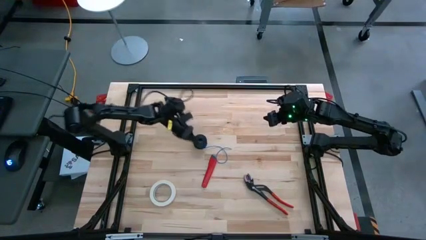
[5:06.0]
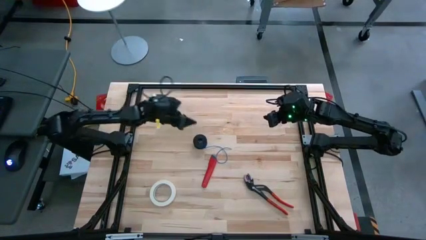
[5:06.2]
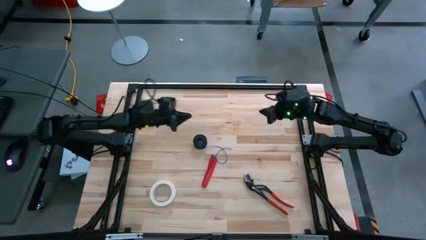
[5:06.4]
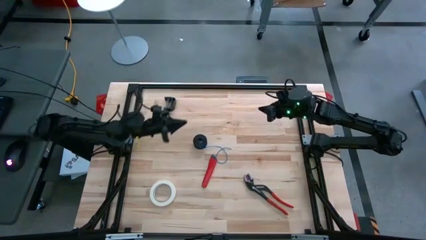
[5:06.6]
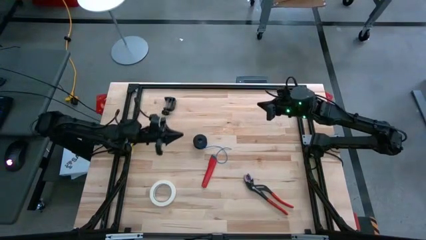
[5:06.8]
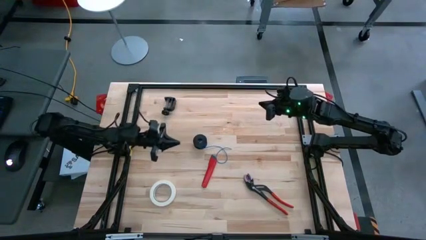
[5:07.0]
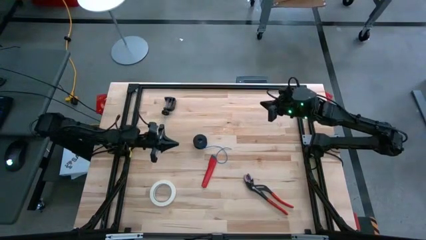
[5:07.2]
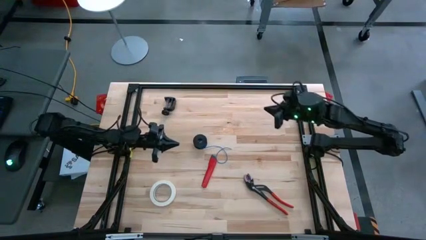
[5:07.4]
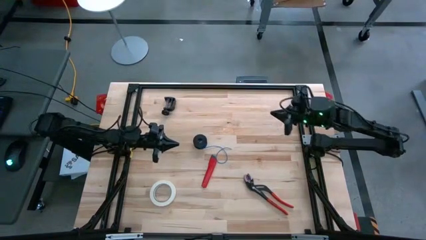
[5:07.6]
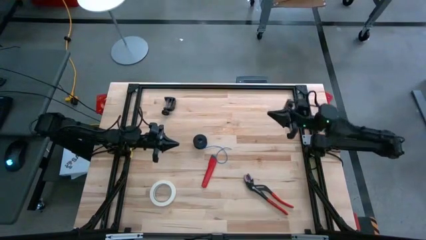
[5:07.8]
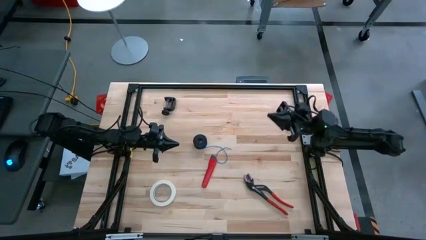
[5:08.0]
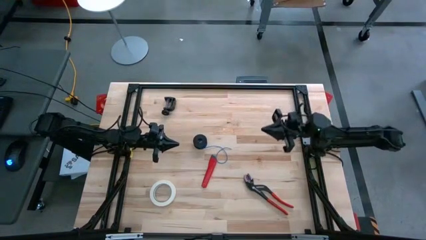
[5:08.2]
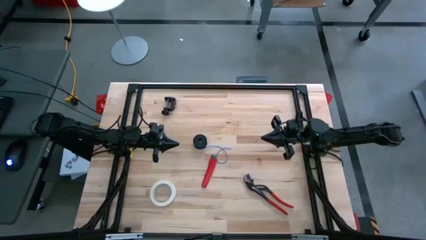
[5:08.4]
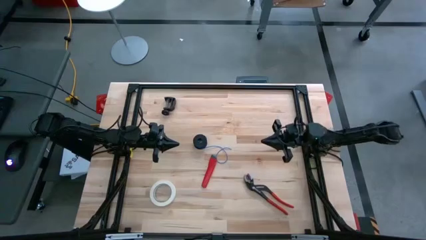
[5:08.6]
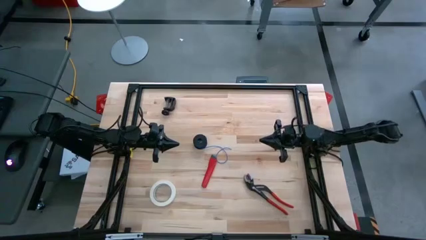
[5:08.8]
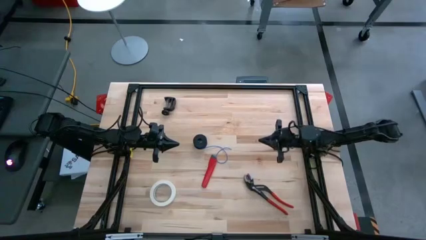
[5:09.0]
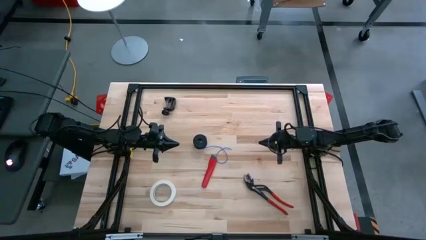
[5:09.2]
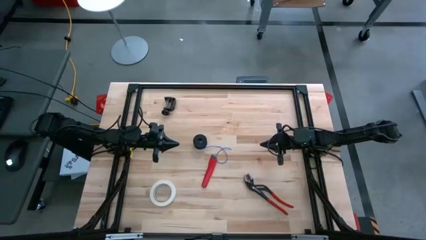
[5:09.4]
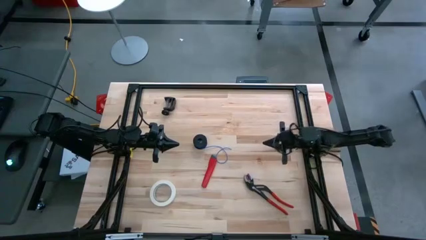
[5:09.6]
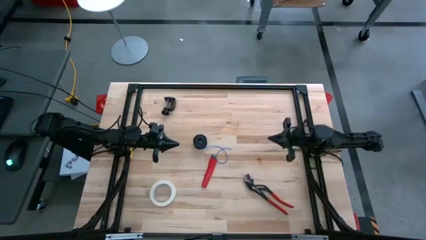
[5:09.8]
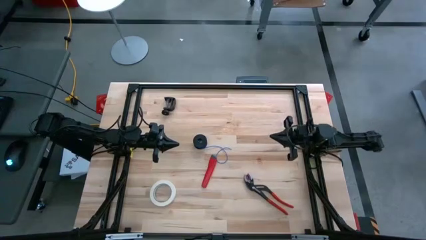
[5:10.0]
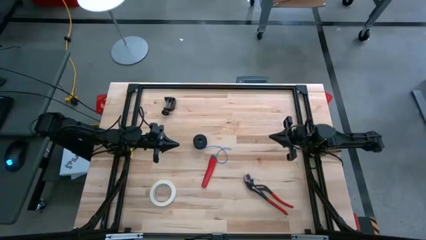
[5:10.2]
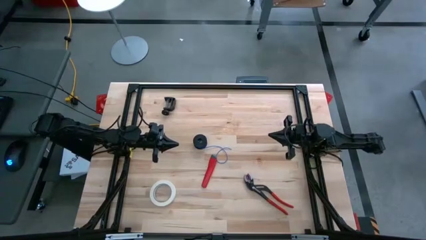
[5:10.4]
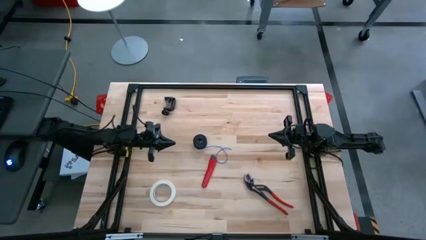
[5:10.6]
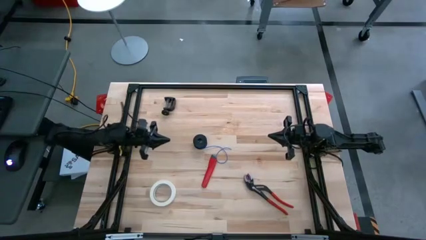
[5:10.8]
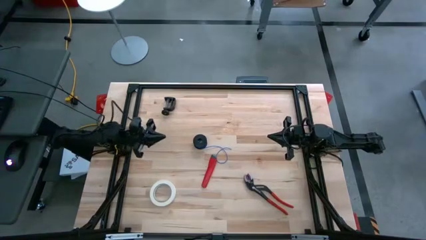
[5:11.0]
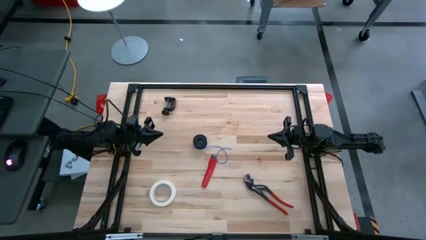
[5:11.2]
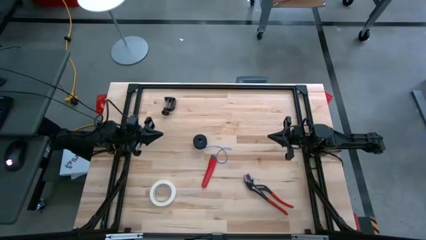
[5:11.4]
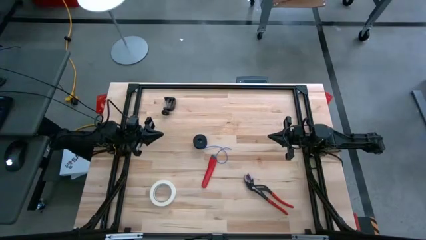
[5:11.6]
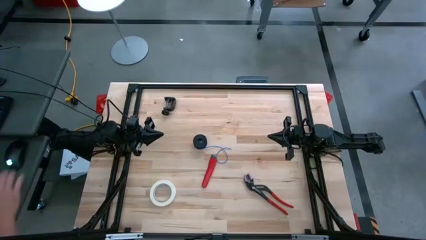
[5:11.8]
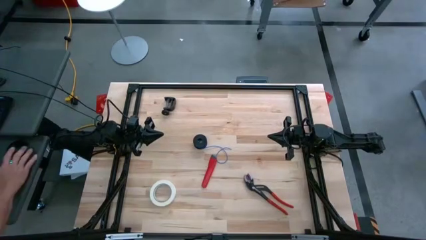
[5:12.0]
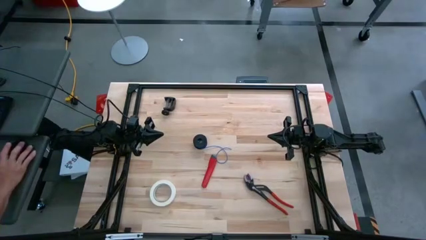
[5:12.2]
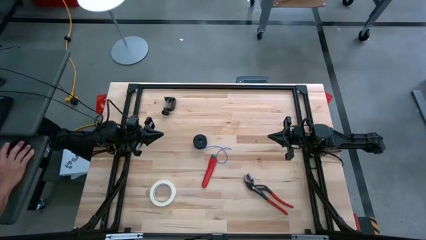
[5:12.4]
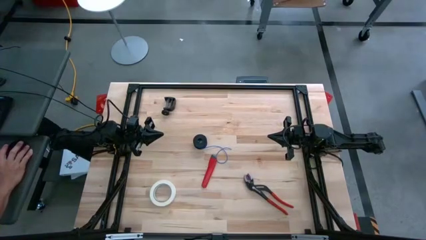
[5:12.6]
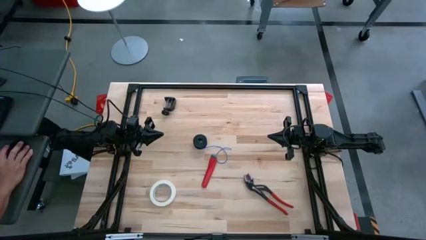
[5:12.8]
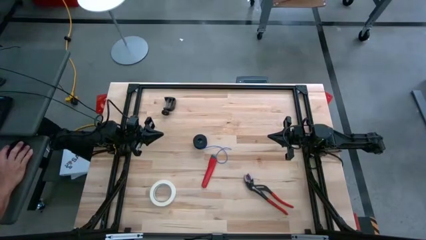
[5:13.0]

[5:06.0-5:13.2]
Task: Coil cords
Return to Home Position

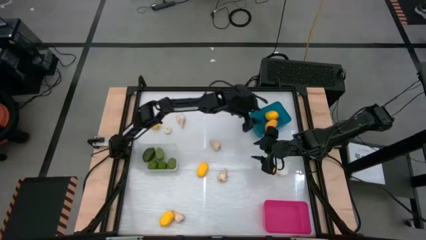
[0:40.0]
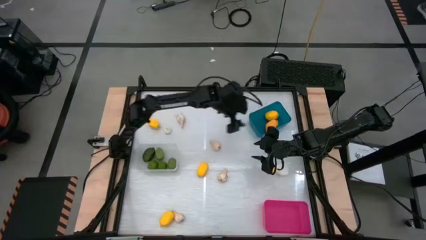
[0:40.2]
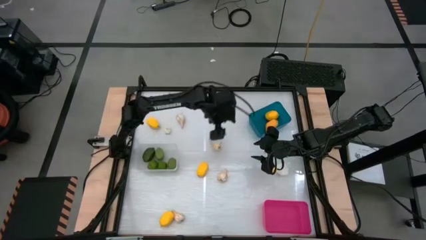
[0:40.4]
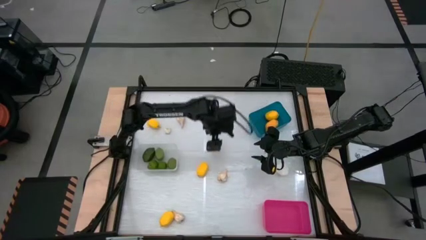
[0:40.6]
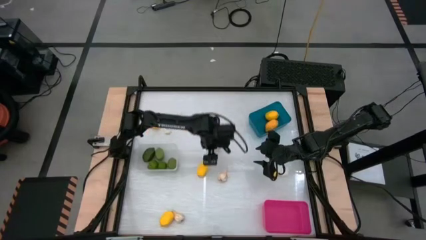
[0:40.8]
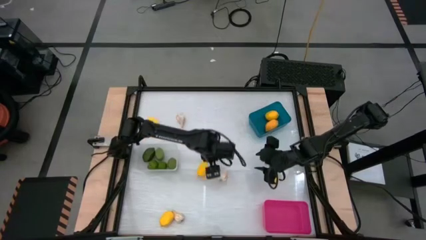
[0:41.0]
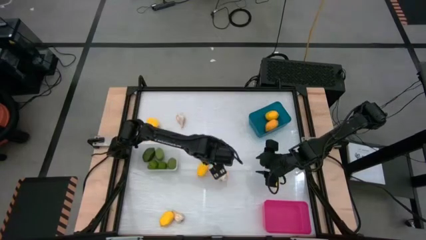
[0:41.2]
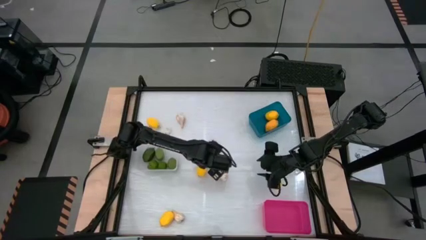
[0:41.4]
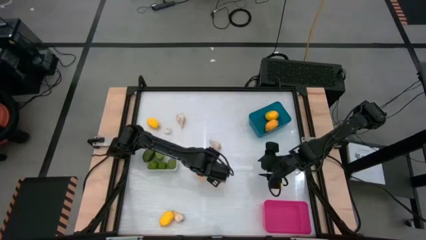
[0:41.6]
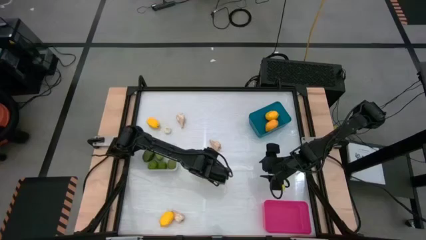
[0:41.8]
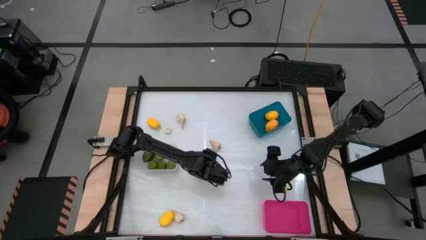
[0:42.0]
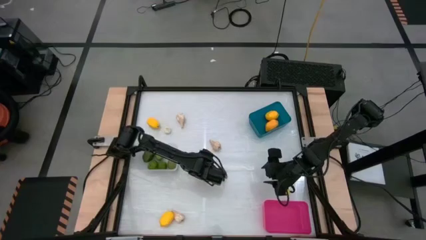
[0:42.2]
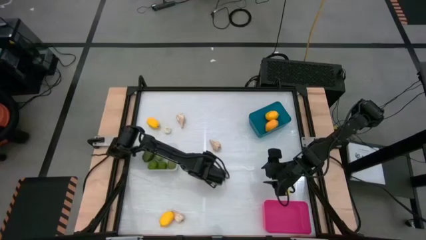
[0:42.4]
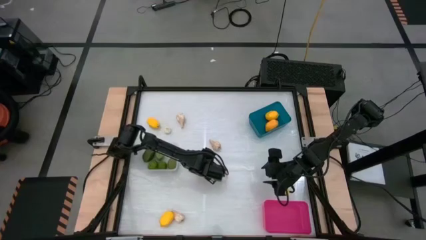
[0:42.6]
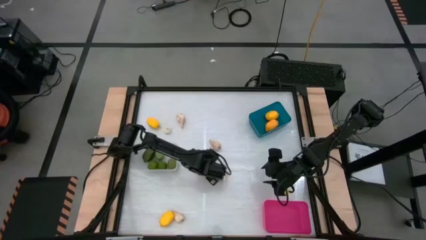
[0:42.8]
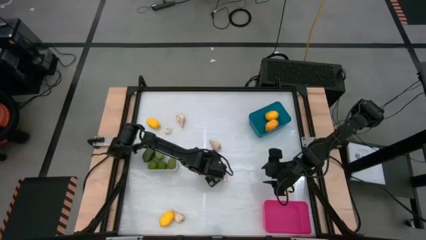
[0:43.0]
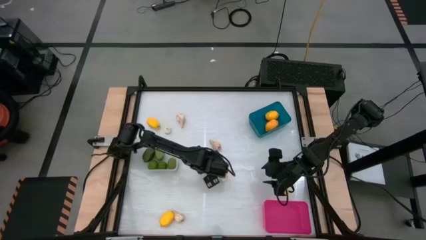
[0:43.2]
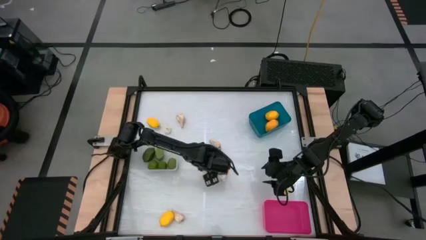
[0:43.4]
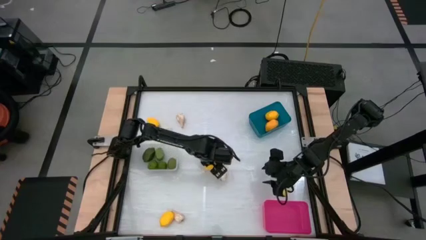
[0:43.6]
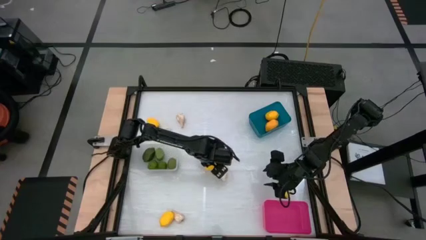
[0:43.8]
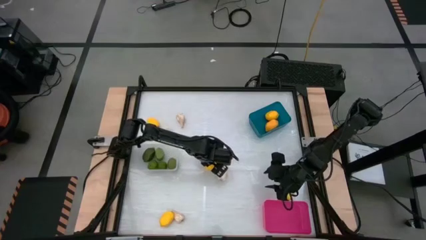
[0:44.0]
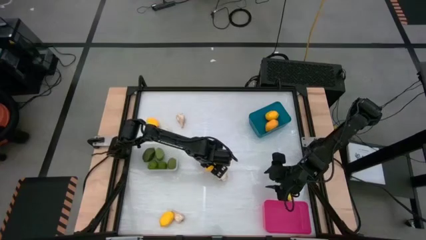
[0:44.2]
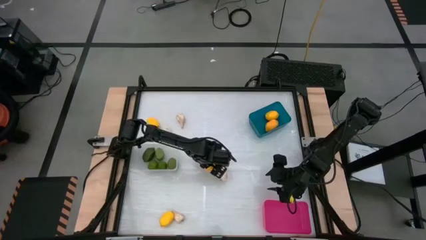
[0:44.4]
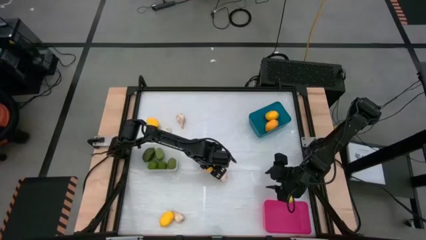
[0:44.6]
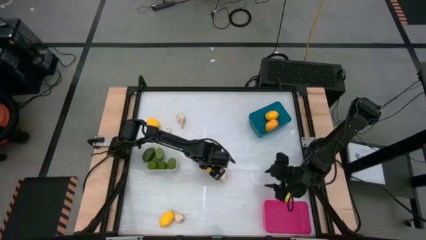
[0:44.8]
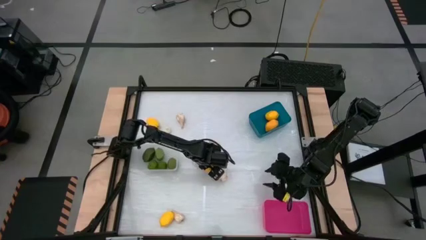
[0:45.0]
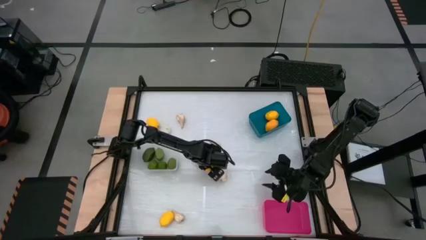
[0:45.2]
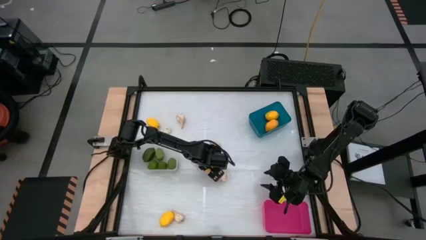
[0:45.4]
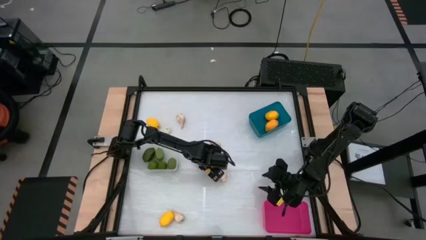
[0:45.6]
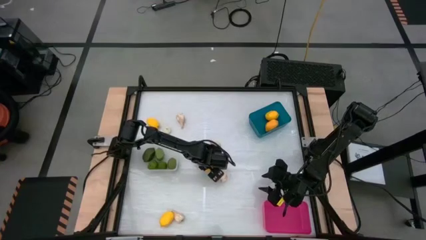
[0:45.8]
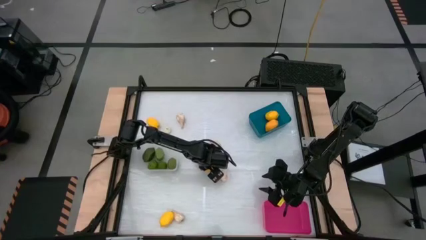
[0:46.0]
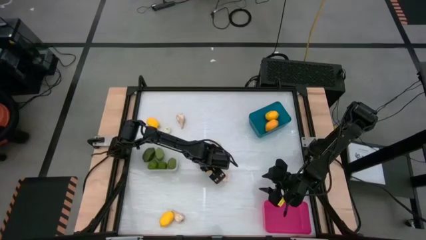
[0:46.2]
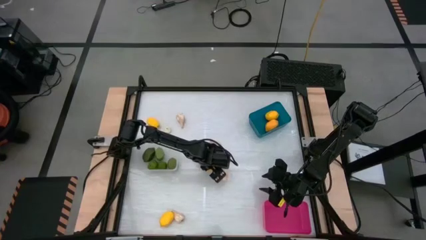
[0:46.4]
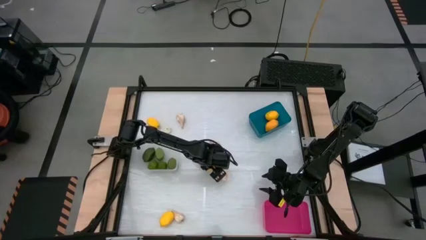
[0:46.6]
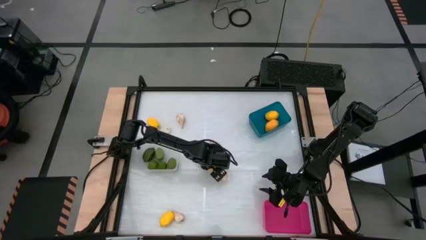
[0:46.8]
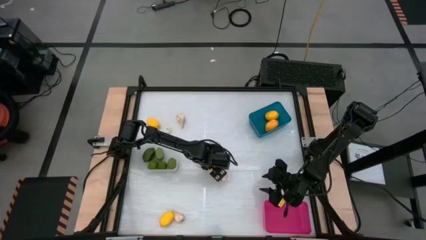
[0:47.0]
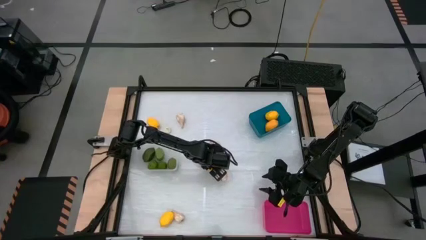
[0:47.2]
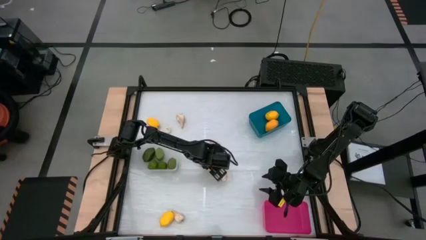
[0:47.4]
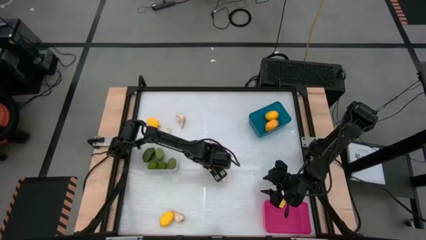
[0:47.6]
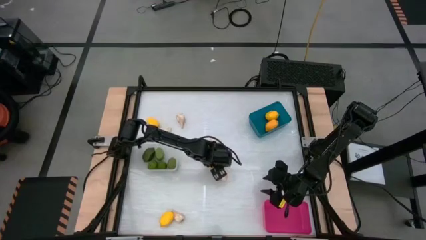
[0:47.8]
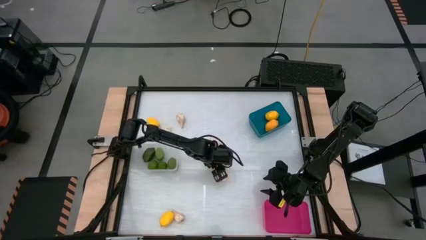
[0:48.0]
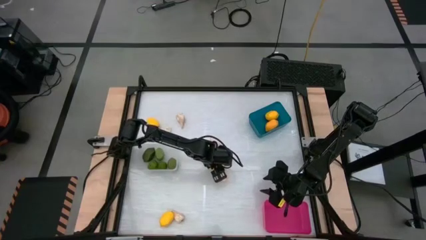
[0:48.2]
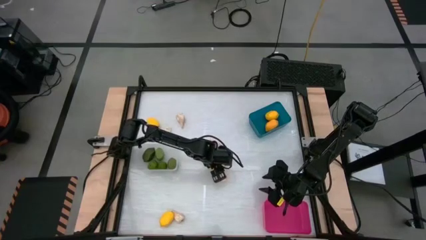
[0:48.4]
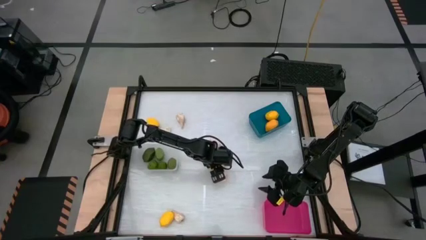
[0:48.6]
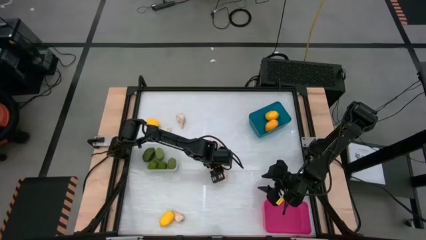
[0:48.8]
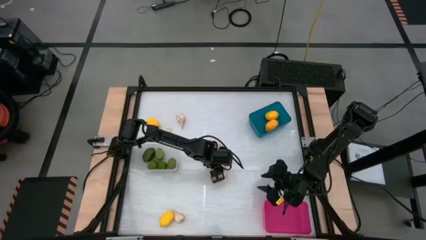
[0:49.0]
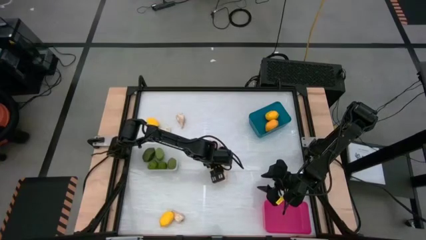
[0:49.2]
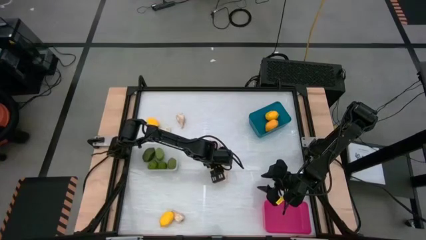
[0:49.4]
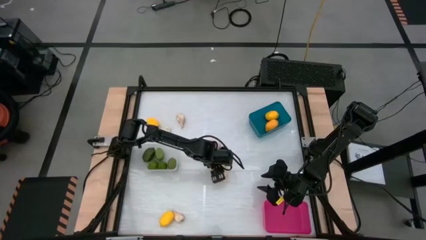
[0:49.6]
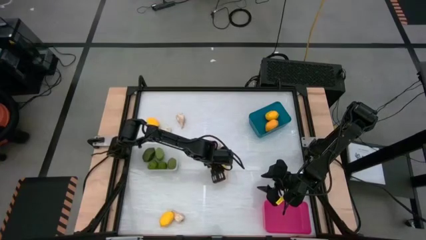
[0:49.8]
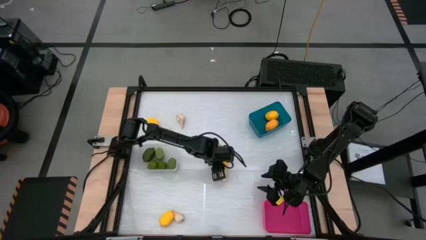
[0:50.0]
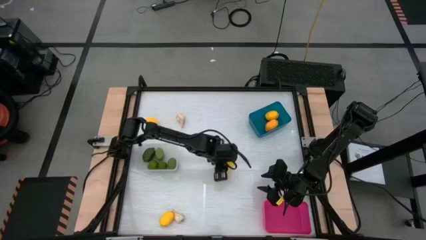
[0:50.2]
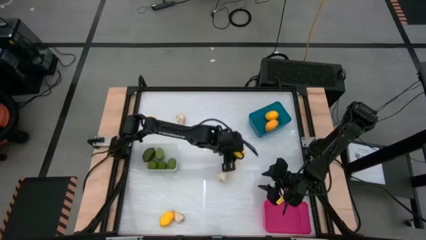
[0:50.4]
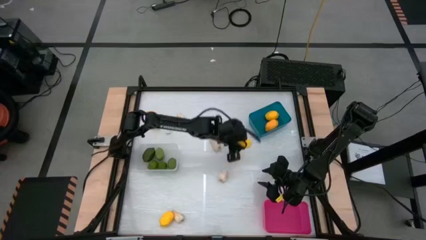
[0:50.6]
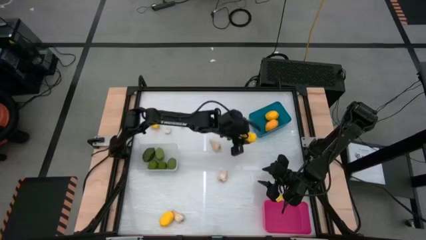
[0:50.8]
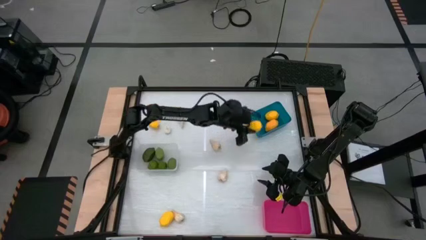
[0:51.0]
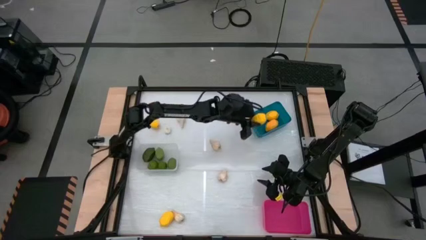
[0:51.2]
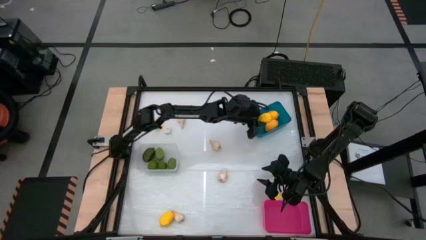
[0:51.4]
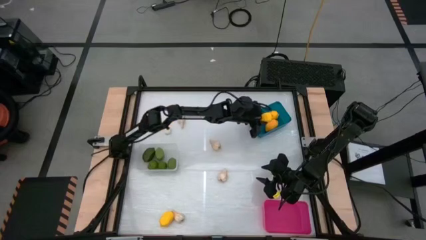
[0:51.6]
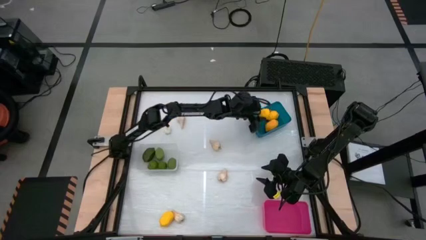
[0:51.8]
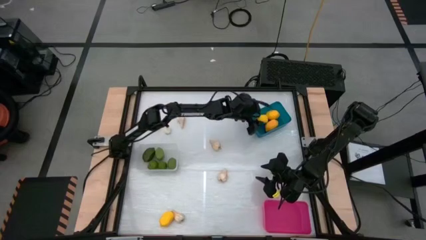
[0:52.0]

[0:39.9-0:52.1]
Task: Sort produce into baskets
Put the yellow lemon into the blue bin
